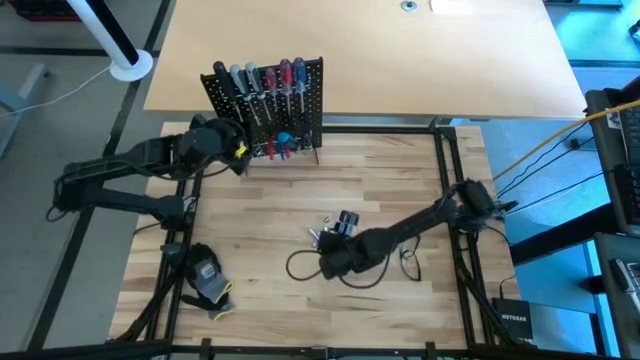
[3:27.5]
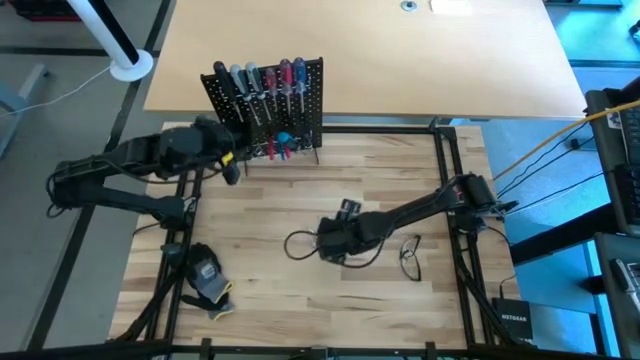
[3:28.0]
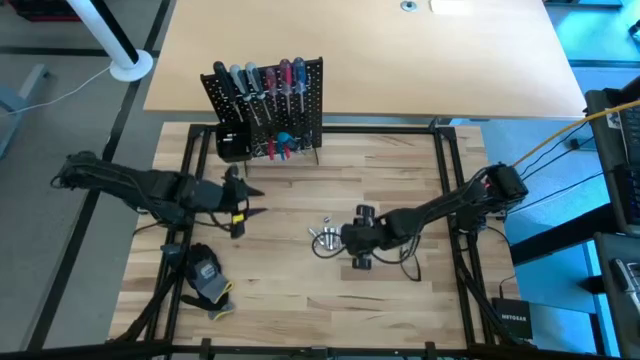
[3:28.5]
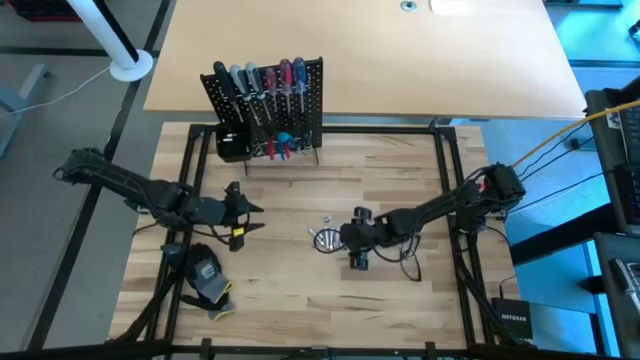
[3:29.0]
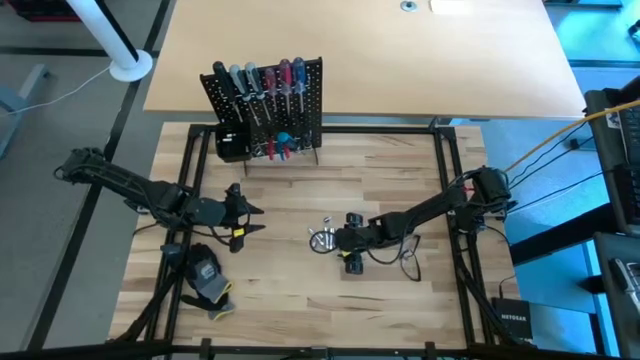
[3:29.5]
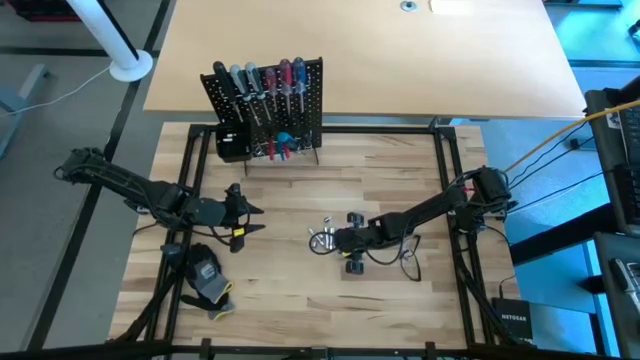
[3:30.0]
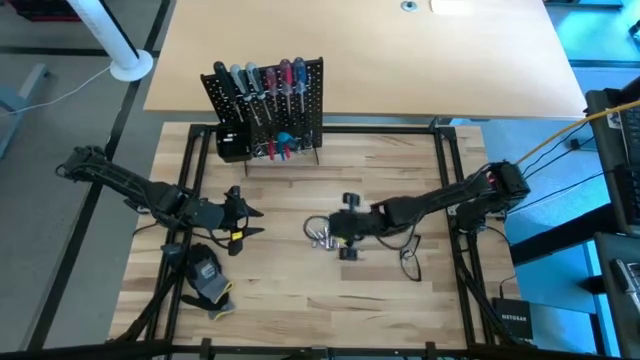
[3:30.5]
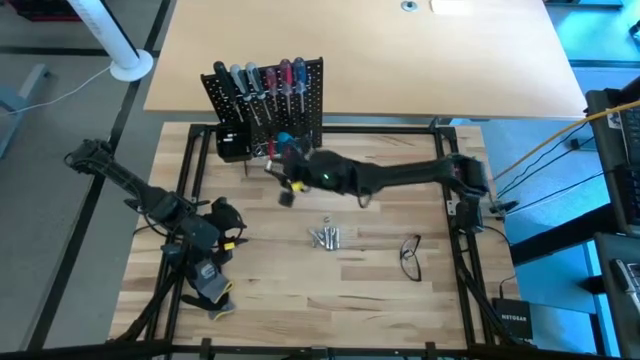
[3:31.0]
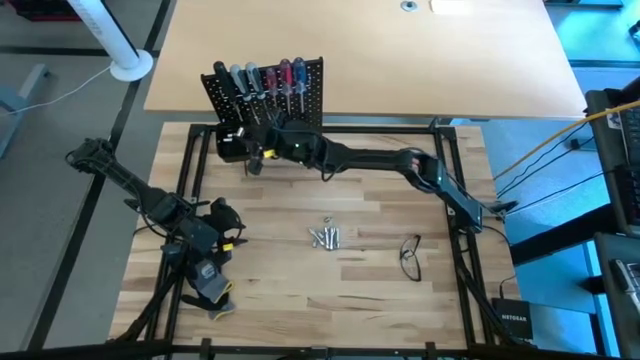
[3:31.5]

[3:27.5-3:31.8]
Task: Hang tools onto peg board
Put the socket into the black bin on the peg board

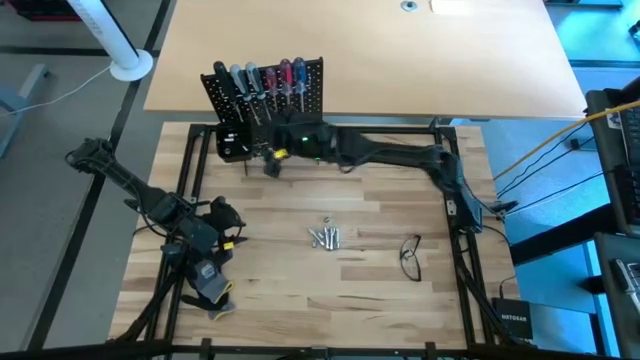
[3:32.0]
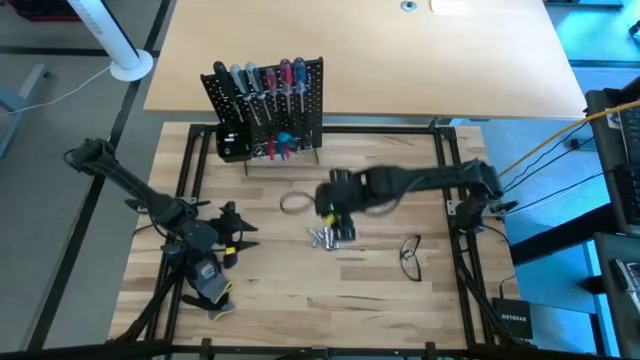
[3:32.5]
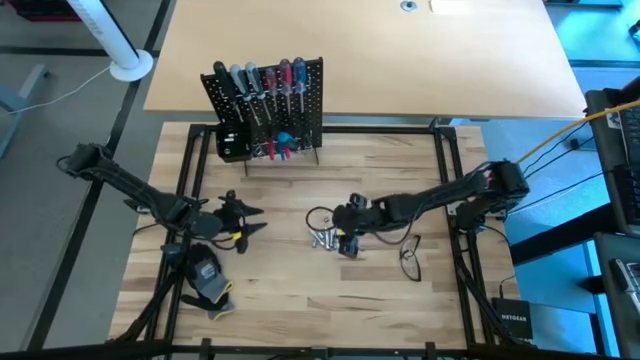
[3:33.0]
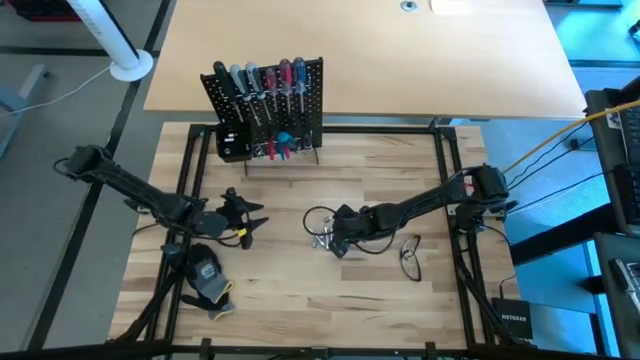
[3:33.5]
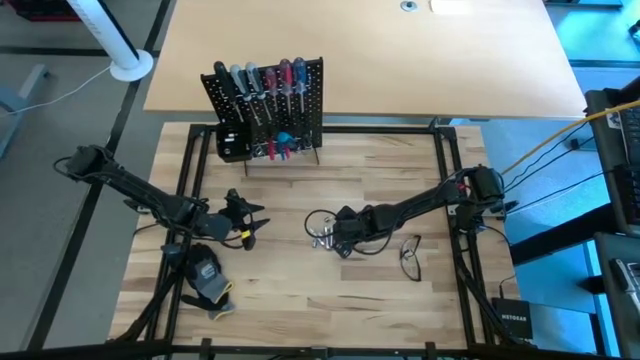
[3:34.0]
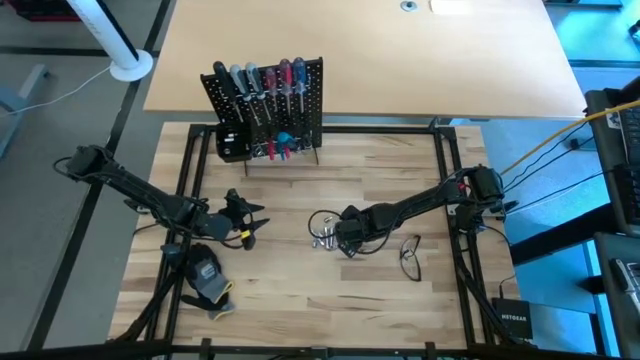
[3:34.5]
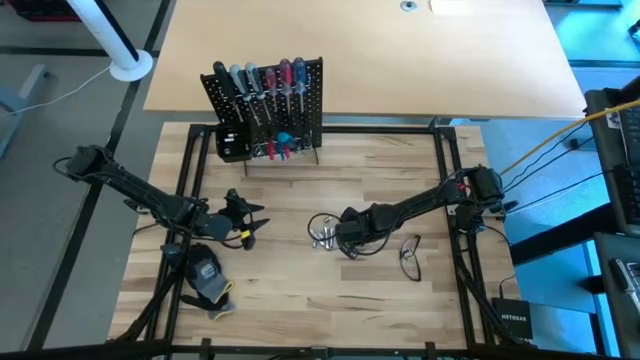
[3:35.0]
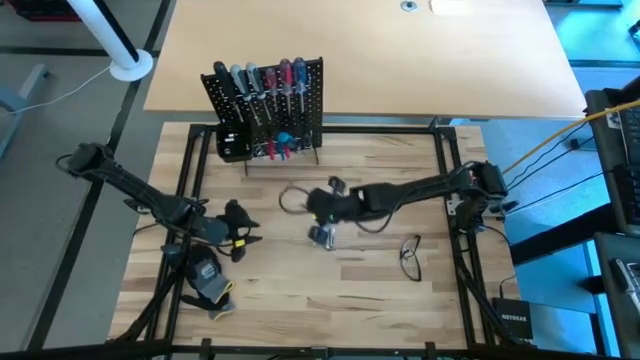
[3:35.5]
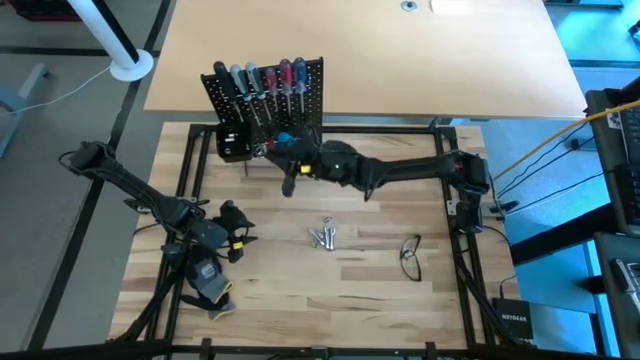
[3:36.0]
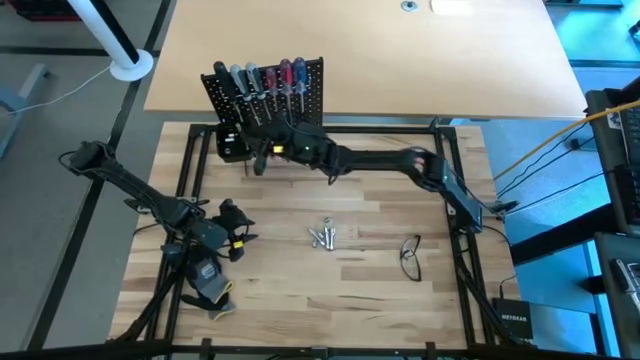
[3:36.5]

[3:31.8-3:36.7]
Put the socket into the black bin on the peg board

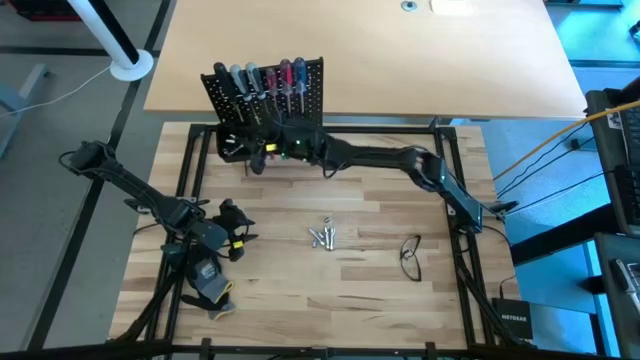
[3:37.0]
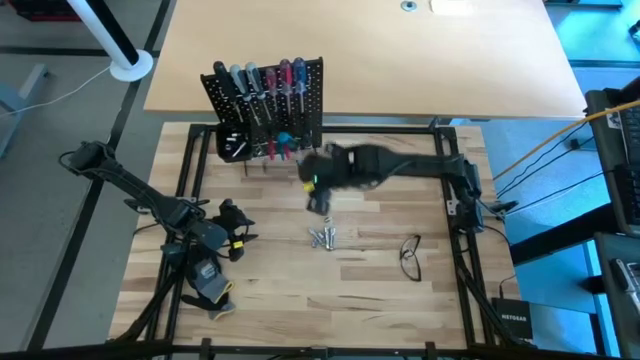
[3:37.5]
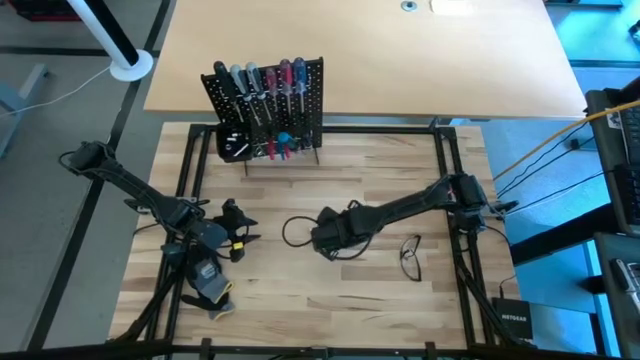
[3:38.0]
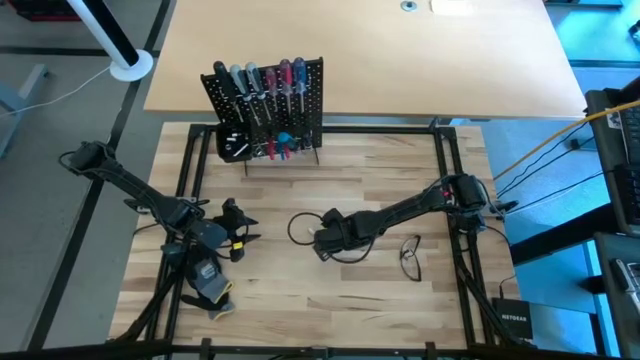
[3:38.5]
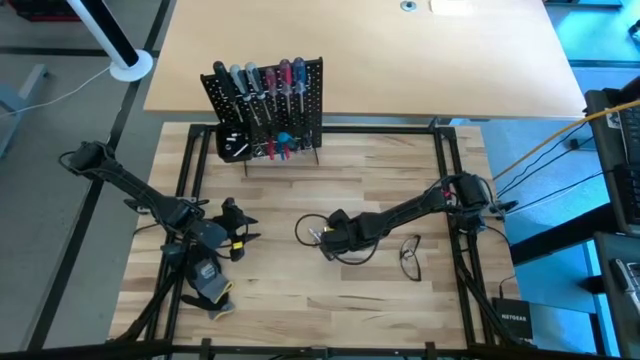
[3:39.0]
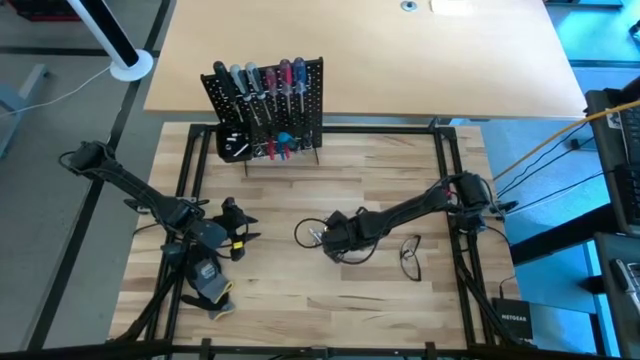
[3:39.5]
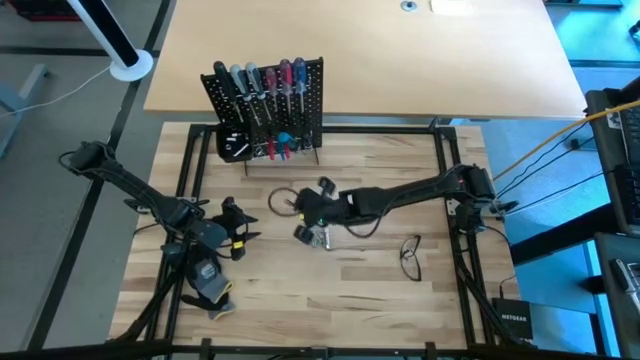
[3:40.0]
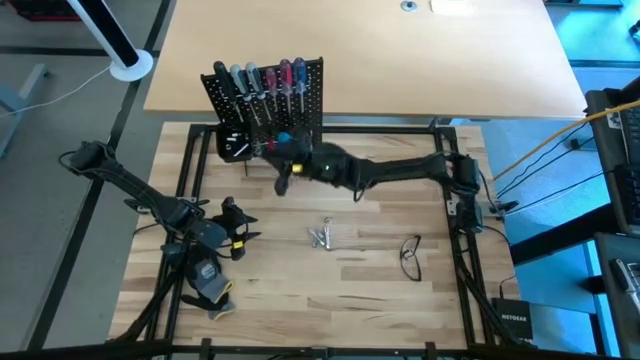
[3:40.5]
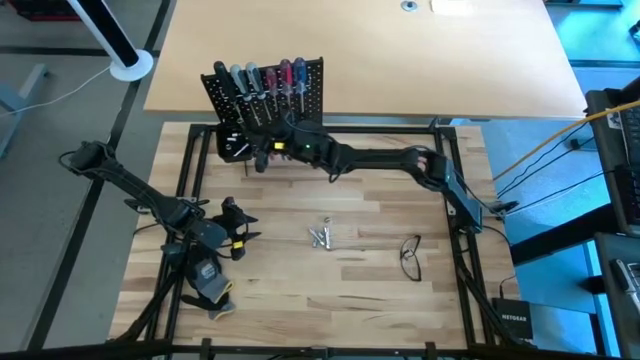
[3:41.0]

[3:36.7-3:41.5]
Put the extension bar into the black bin on the peg board

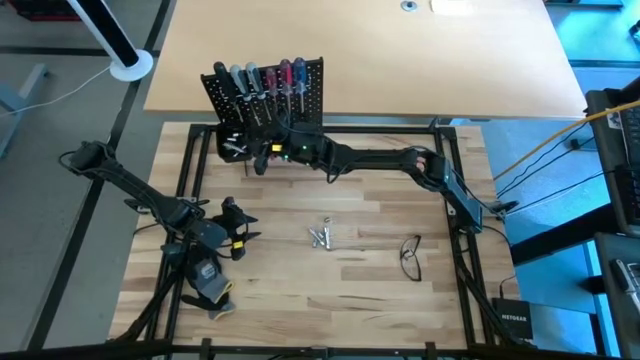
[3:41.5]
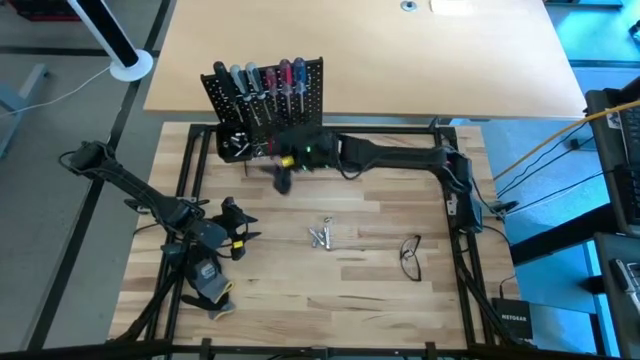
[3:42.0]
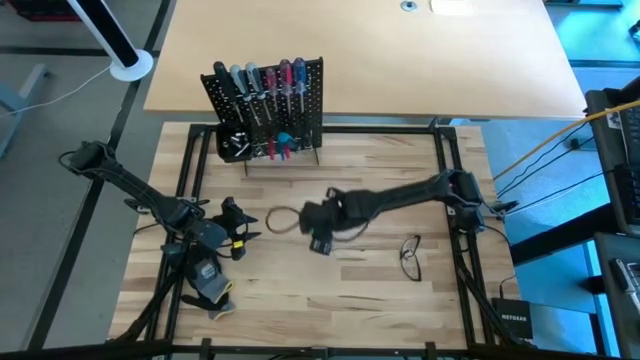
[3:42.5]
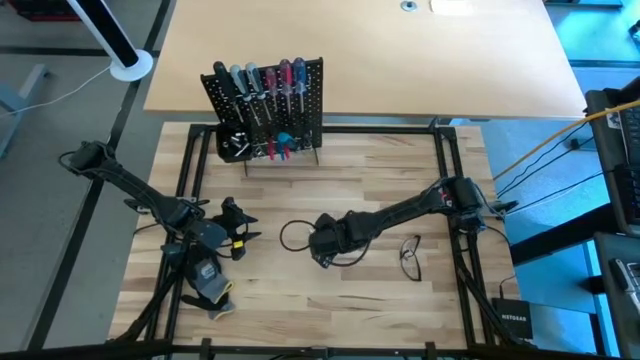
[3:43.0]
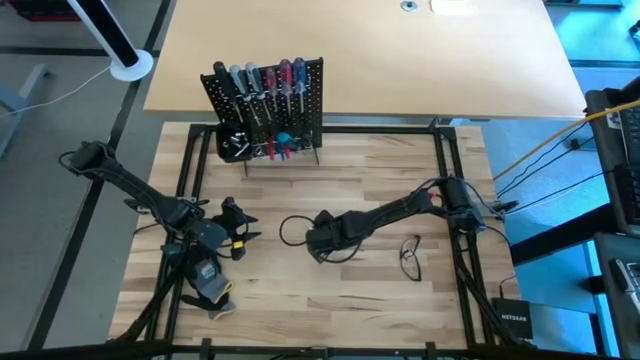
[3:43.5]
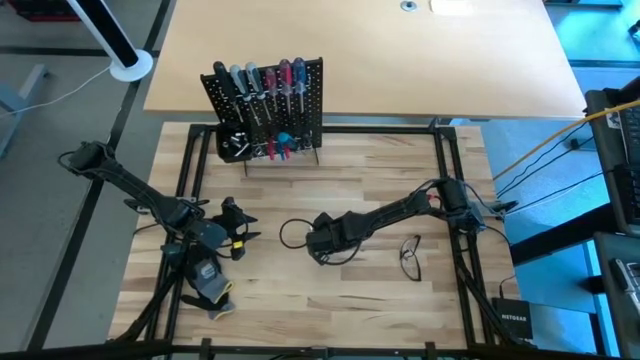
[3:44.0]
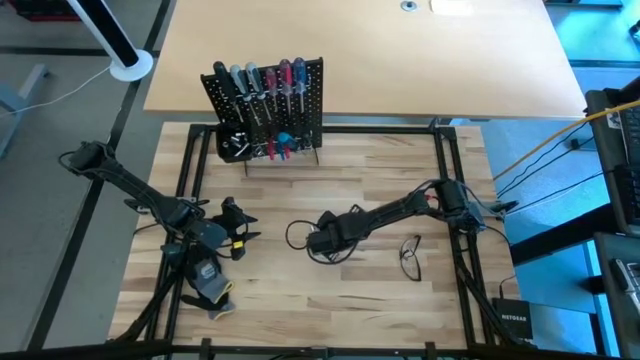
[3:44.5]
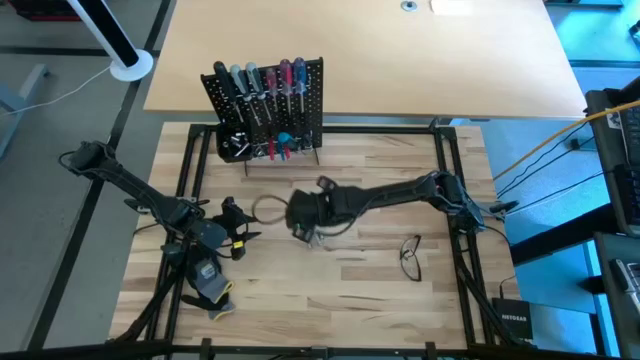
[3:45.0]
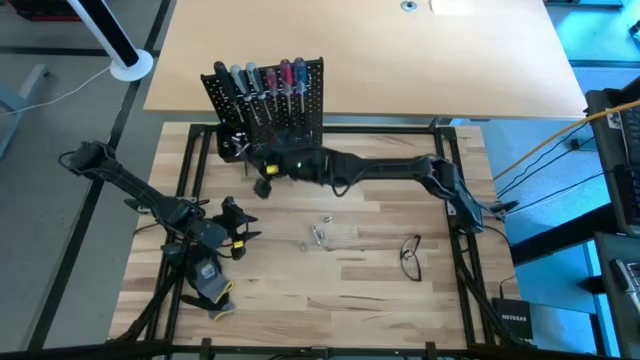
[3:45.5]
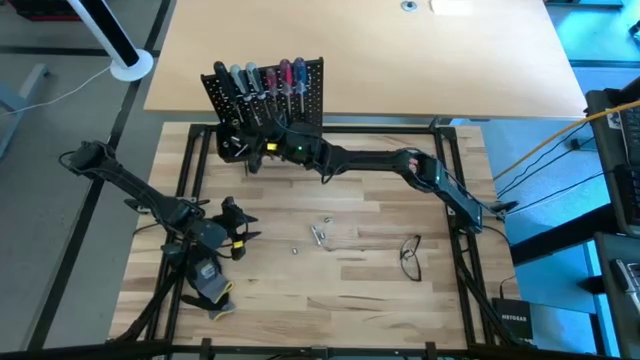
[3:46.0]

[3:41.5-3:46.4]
Put the extension bar into the black bin on the peg board

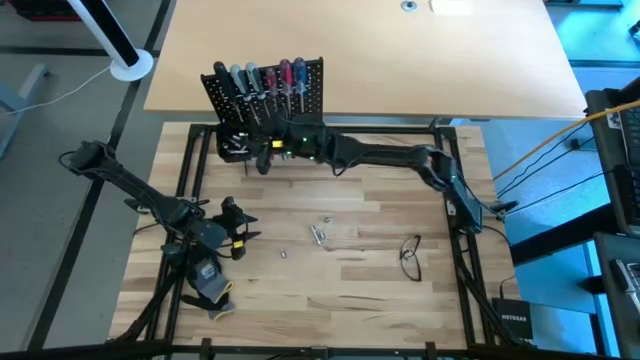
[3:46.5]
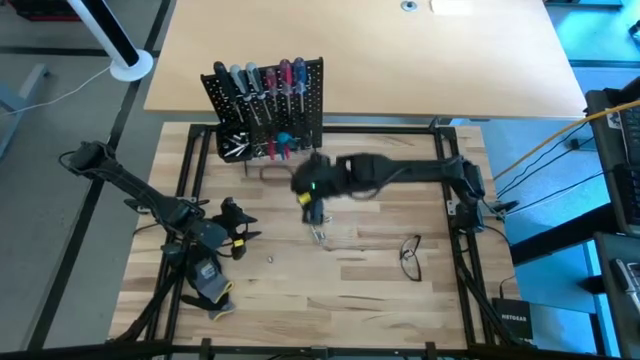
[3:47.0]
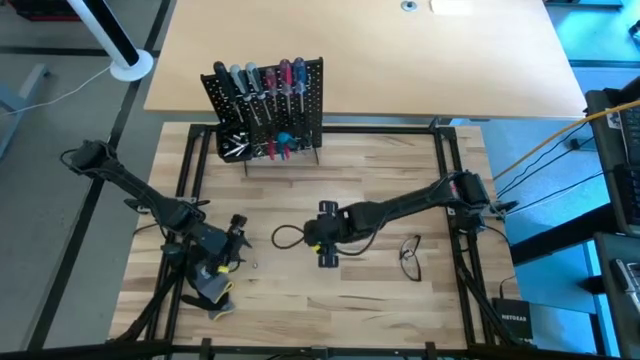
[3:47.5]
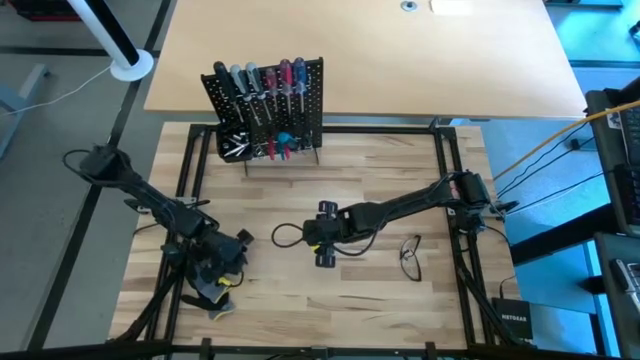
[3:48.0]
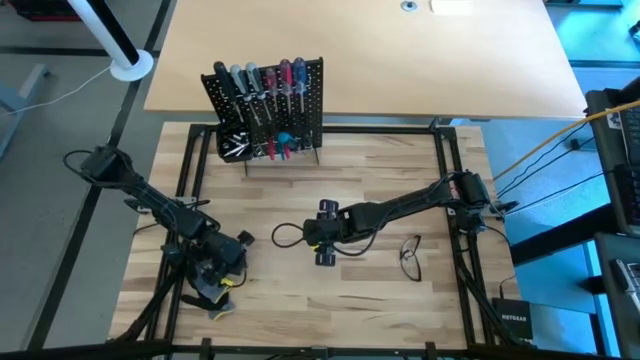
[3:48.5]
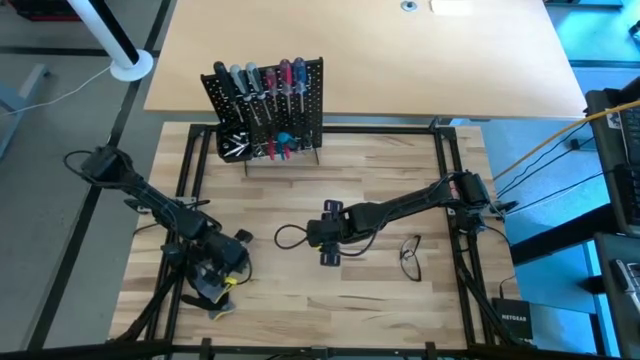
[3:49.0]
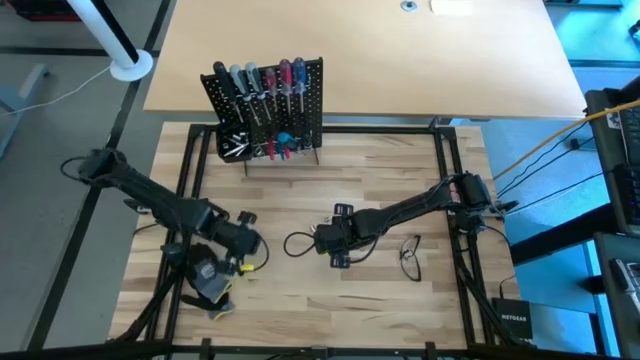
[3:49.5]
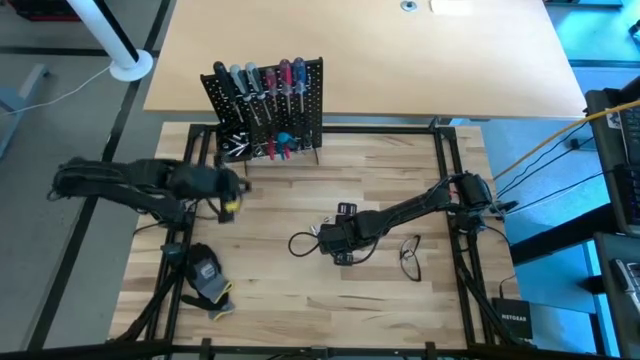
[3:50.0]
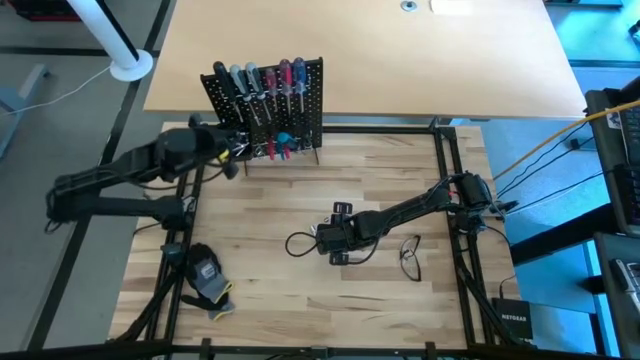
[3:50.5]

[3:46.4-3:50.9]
Put the socket into the black bin on the peg board
